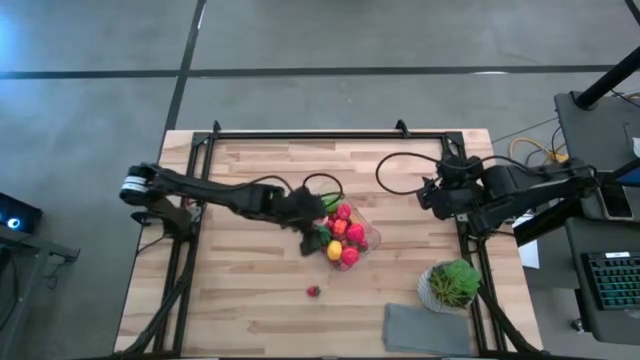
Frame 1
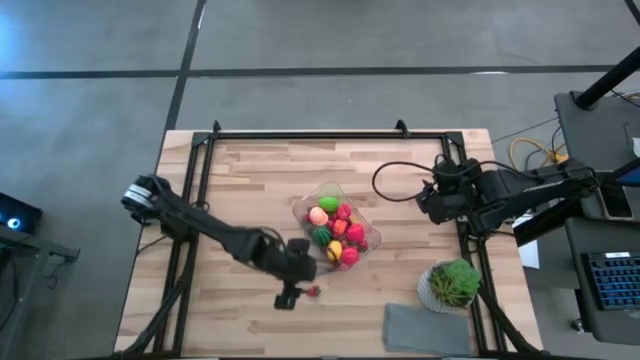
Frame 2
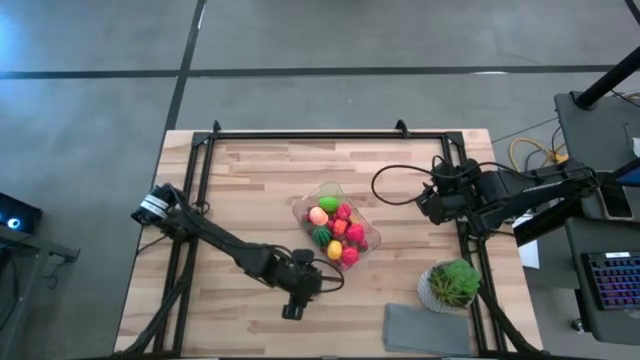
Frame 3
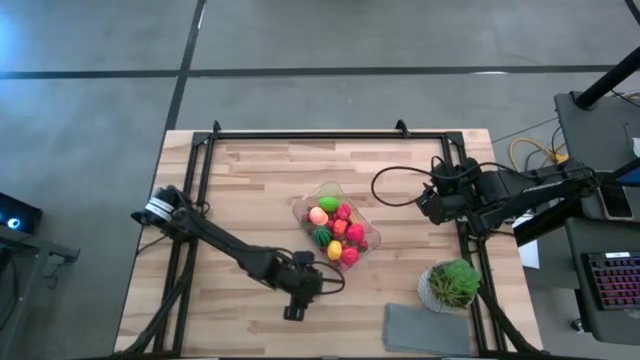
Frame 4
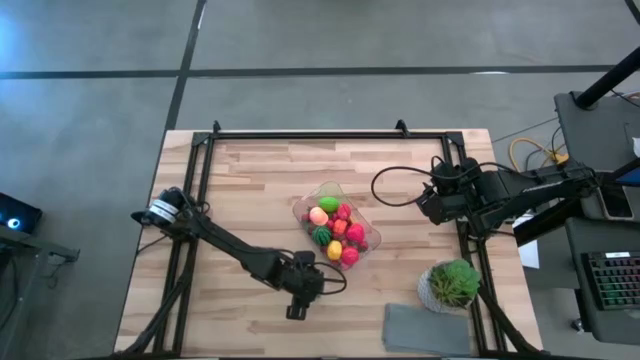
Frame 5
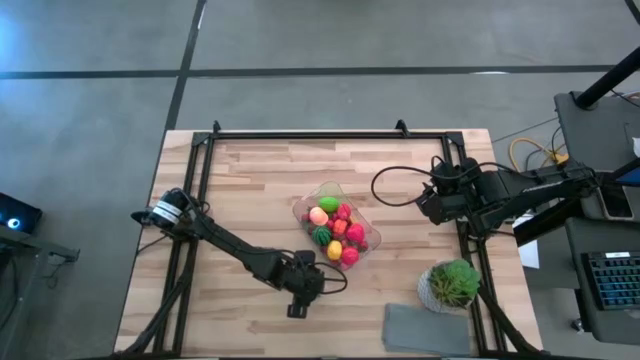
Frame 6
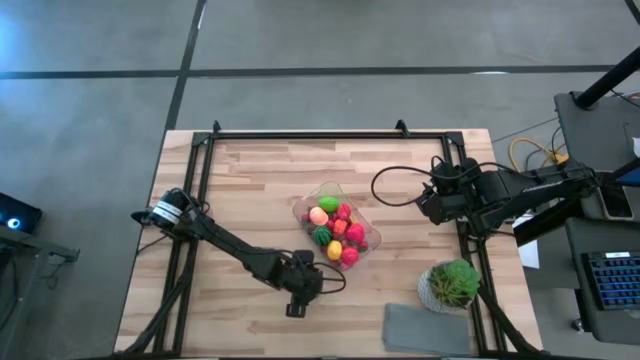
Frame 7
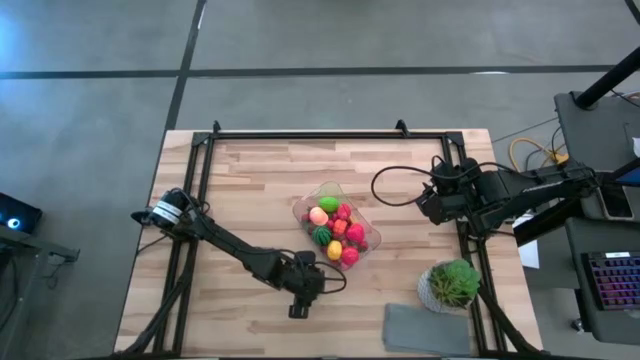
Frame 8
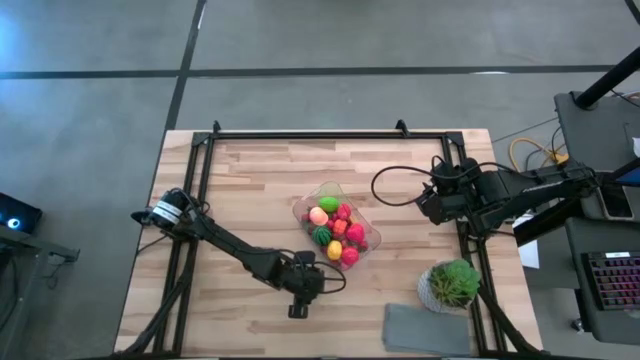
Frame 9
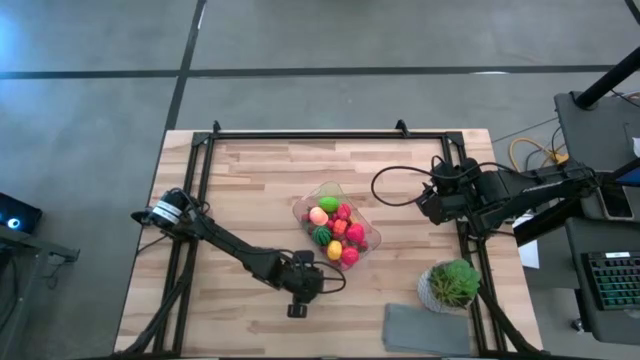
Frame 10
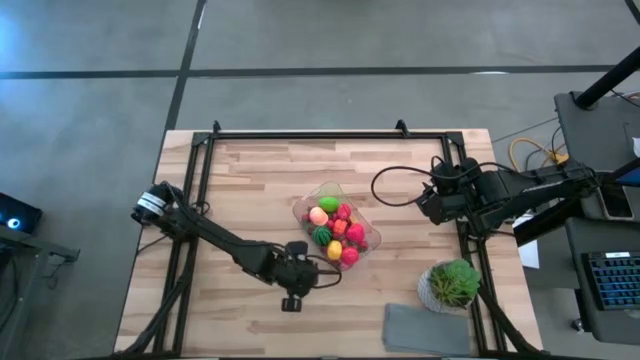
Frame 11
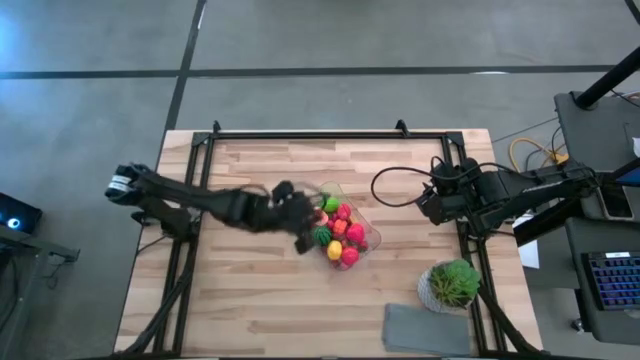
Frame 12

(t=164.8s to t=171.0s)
Task: Pick and placing Produce into tupperware
Put the red strawberry into the transparent bin

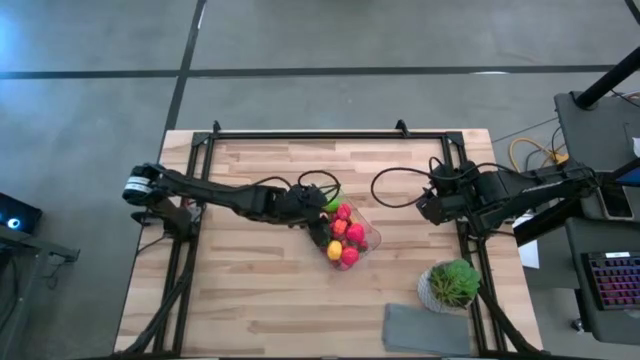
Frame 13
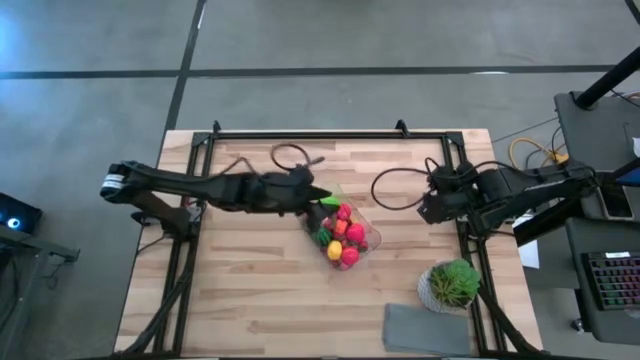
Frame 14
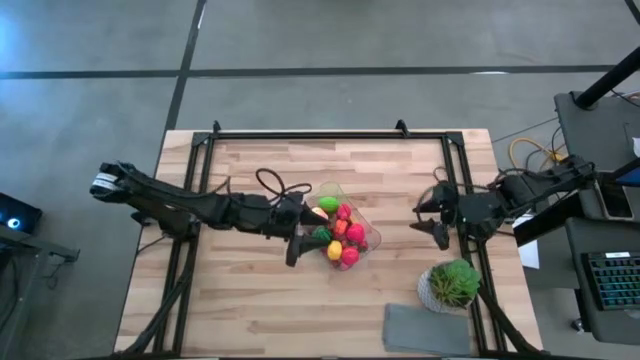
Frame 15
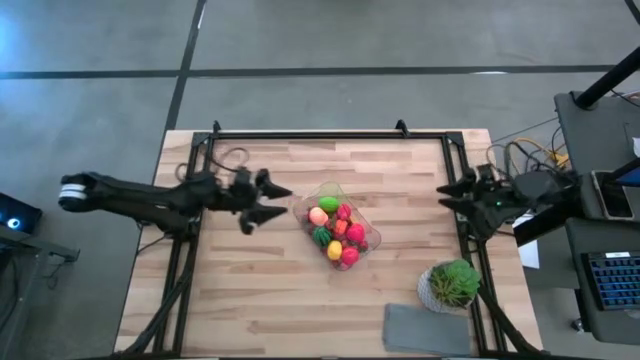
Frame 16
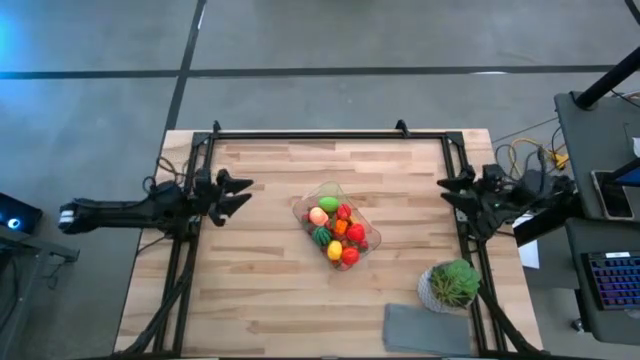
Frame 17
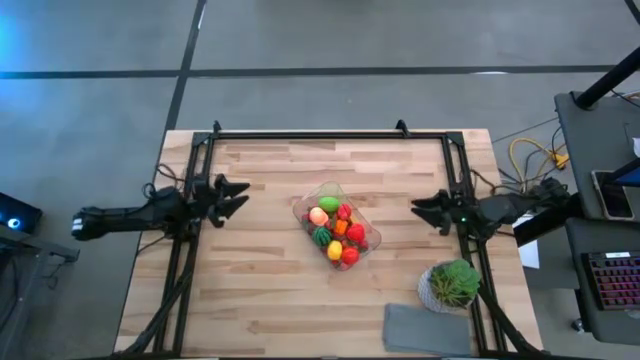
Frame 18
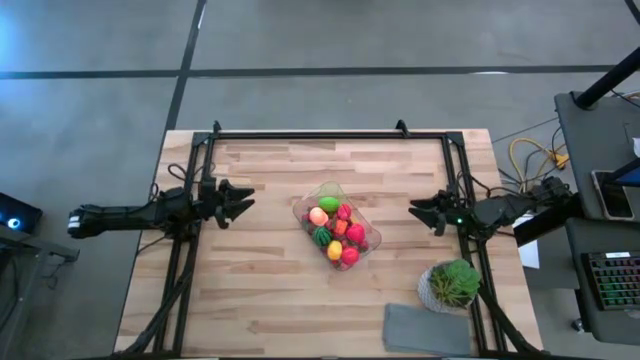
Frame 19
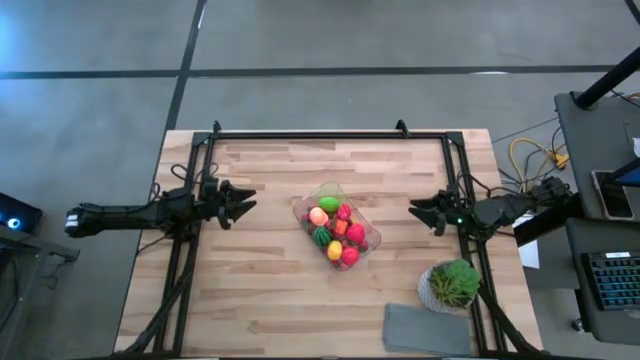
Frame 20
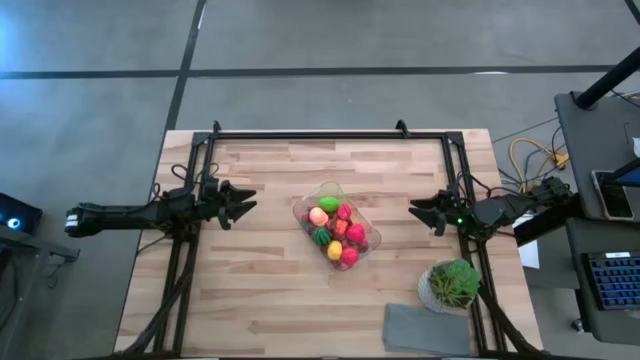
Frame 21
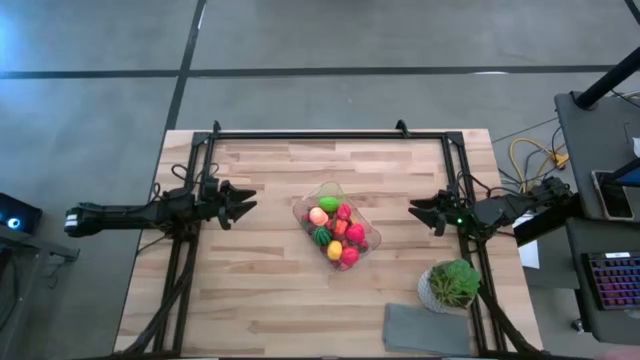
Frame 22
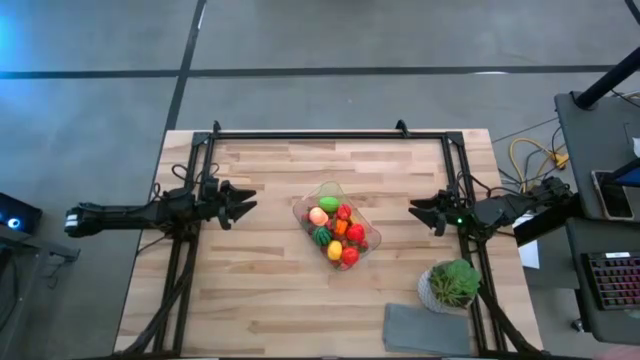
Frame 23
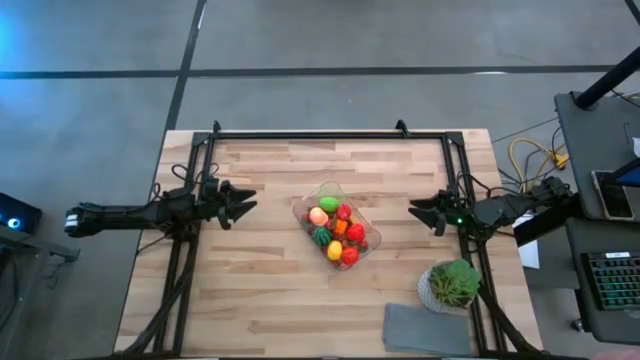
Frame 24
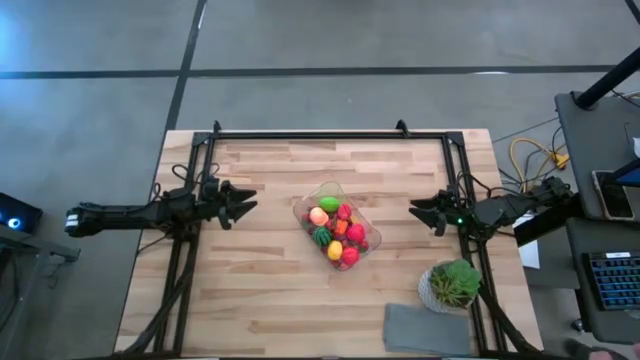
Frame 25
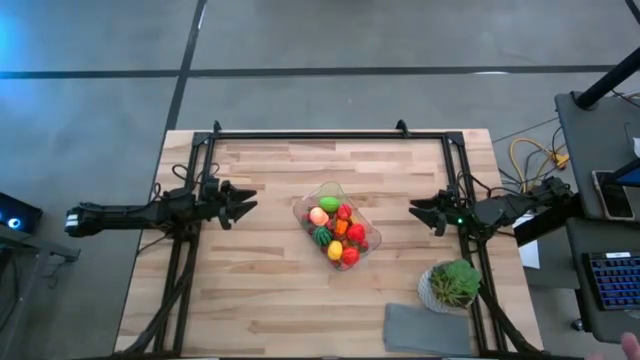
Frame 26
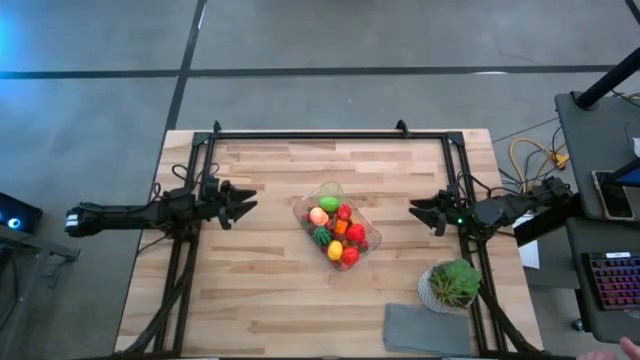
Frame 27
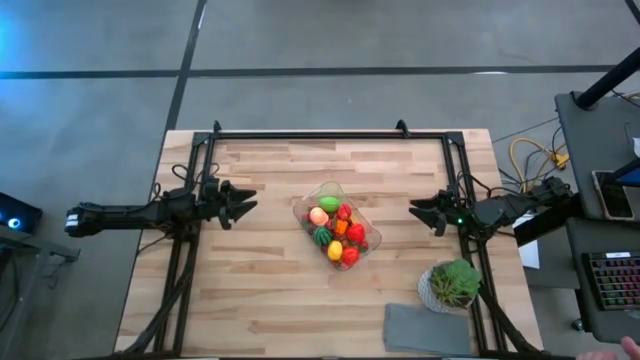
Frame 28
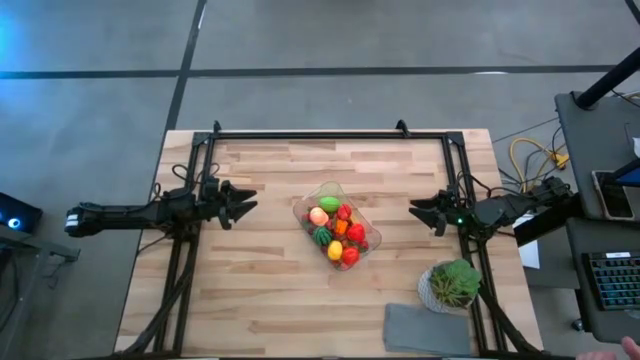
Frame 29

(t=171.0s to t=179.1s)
Return to Home Position

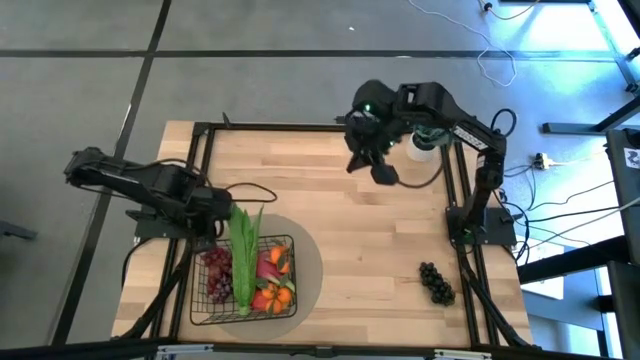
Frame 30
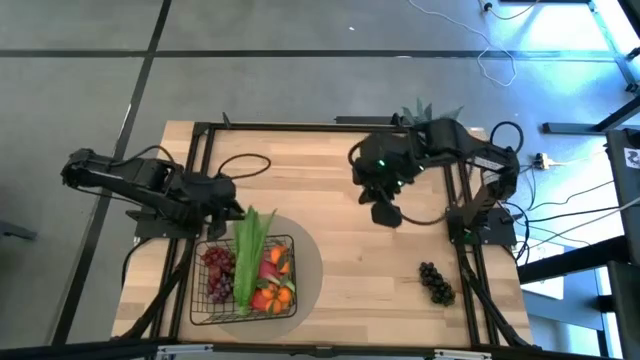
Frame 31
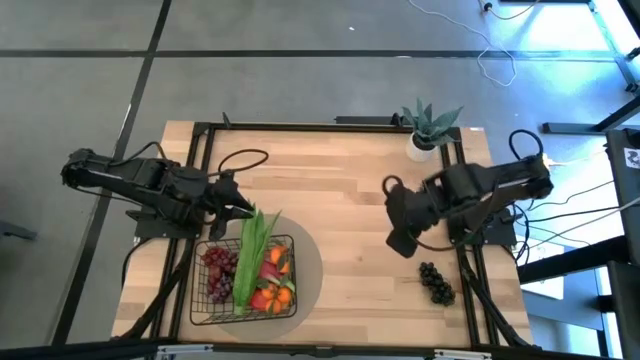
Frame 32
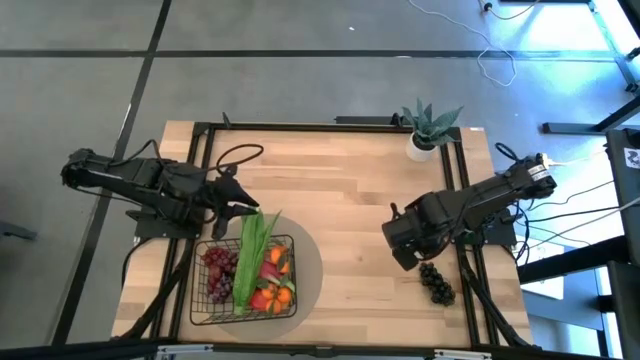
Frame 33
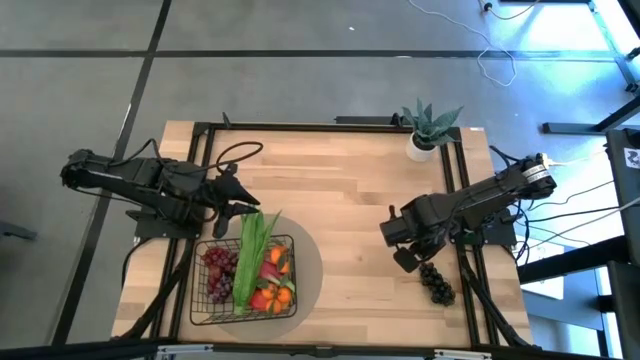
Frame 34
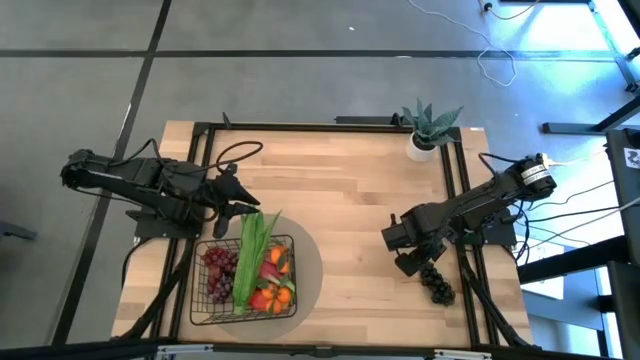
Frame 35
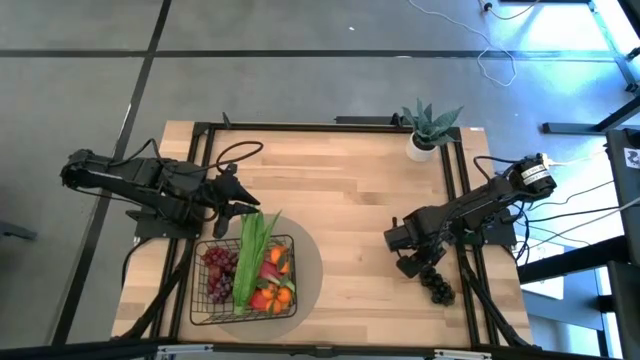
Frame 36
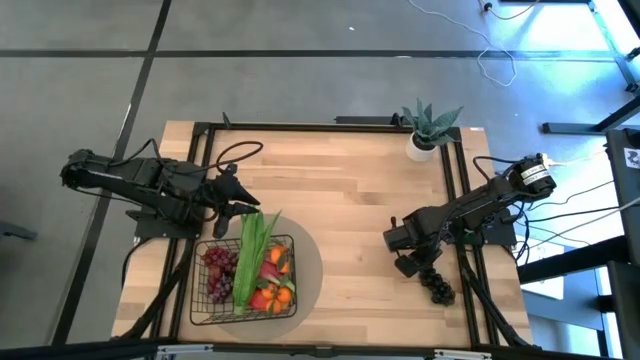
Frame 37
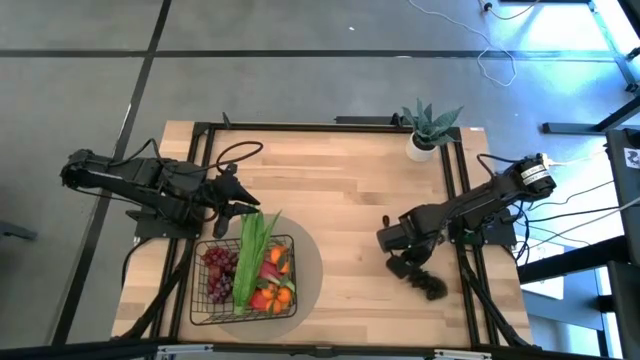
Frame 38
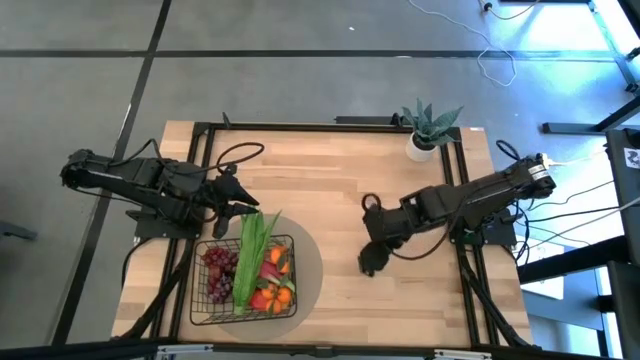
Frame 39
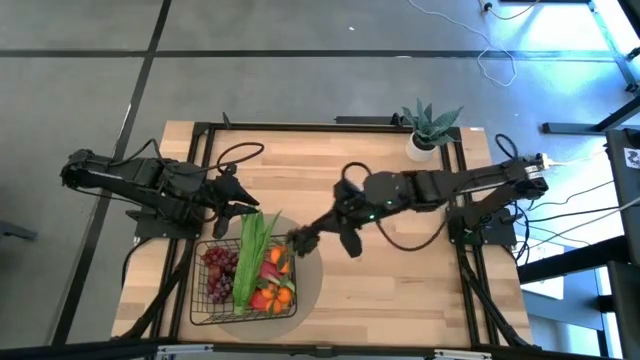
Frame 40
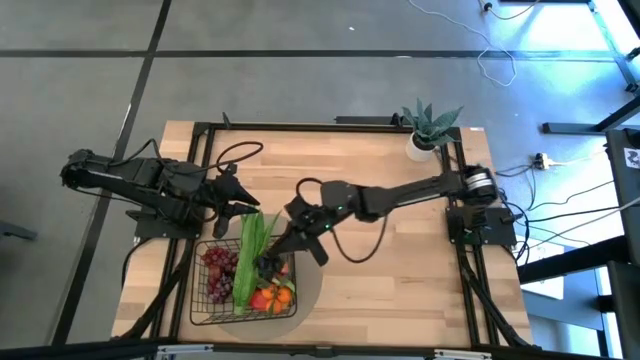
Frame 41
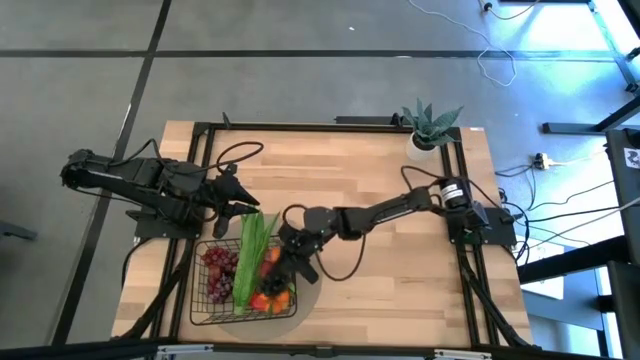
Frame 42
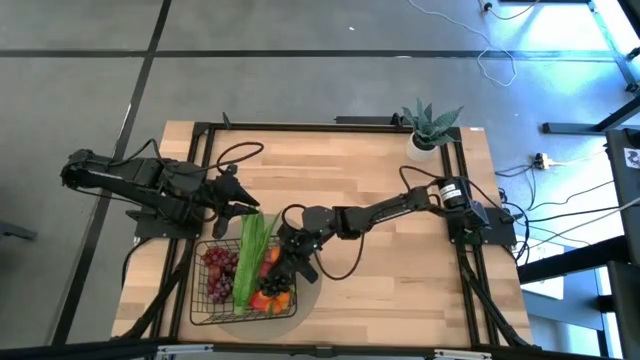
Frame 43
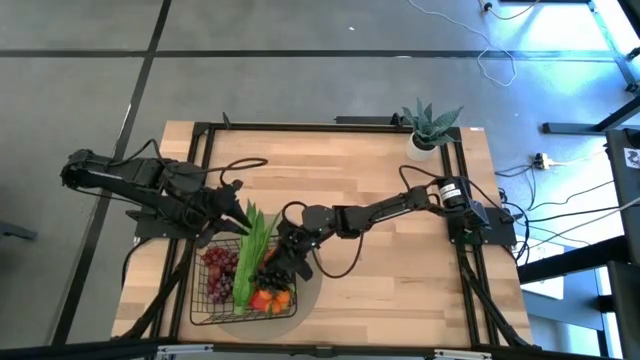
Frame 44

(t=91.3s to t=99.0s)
Task: Build produce basket
Put the black grapes into the black wire basket
